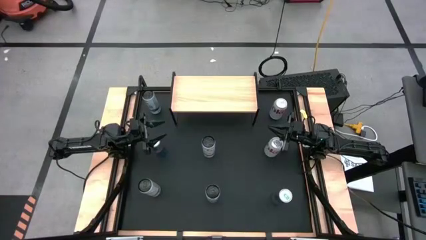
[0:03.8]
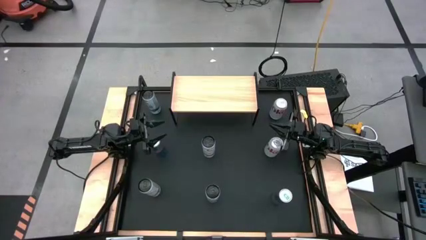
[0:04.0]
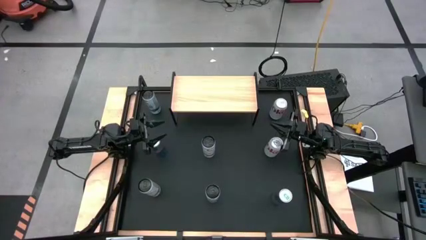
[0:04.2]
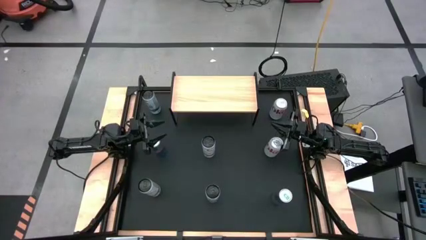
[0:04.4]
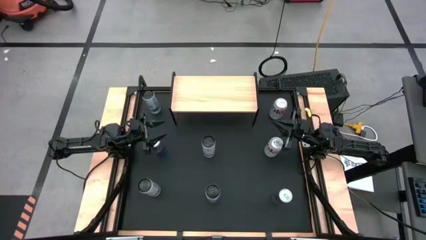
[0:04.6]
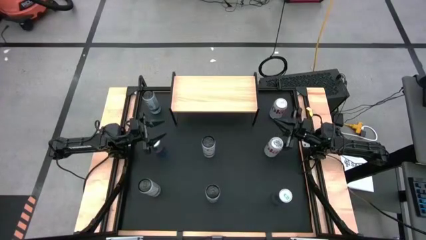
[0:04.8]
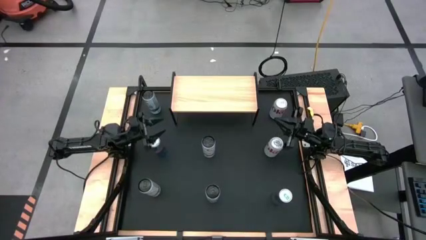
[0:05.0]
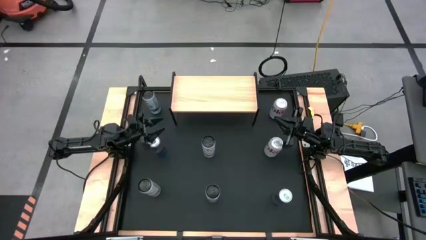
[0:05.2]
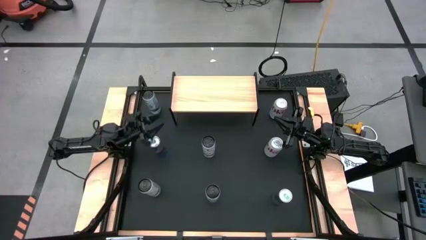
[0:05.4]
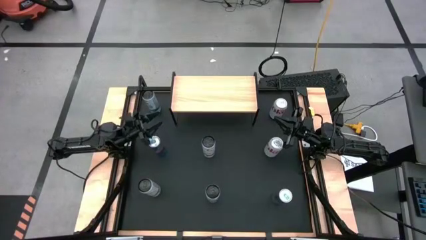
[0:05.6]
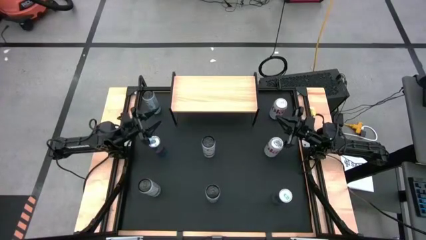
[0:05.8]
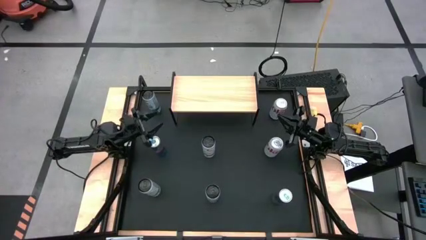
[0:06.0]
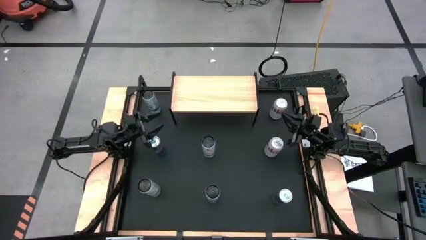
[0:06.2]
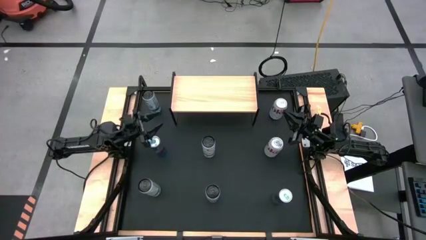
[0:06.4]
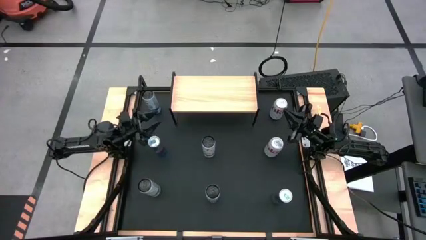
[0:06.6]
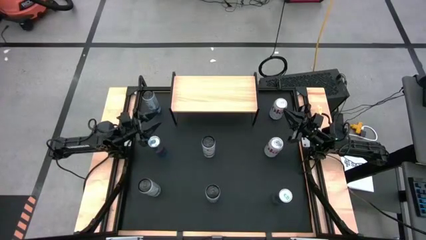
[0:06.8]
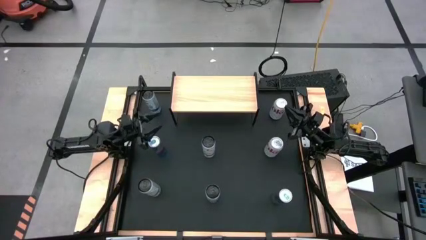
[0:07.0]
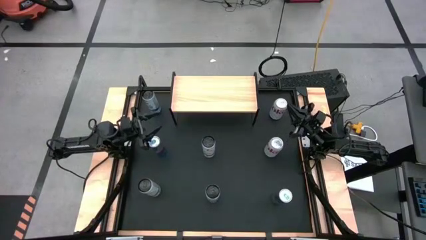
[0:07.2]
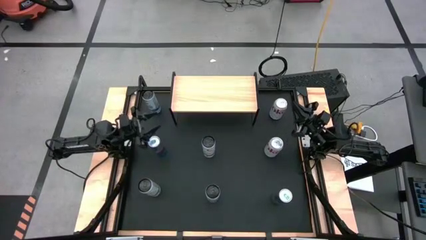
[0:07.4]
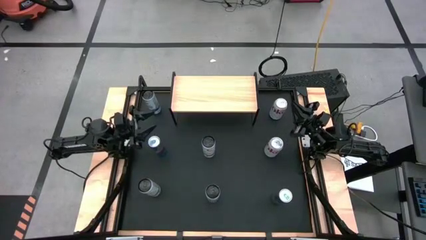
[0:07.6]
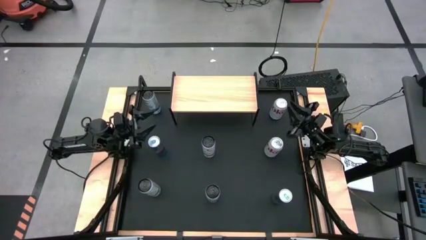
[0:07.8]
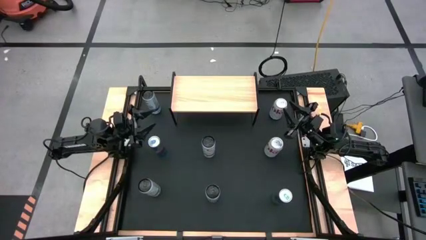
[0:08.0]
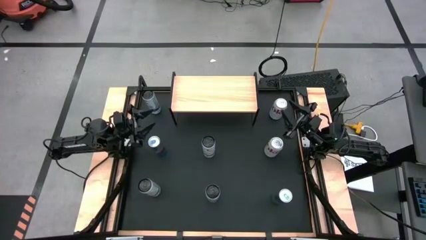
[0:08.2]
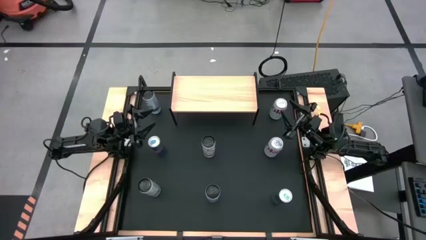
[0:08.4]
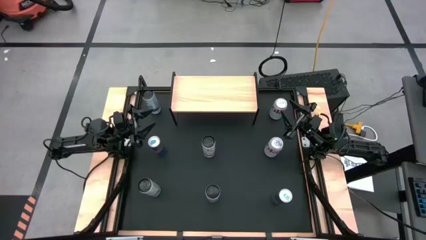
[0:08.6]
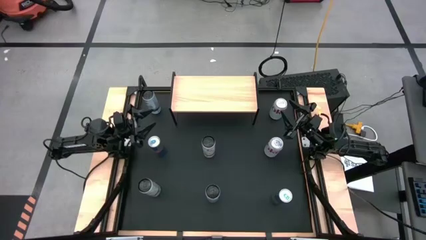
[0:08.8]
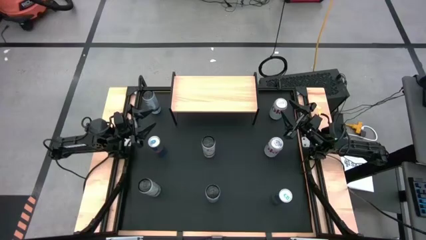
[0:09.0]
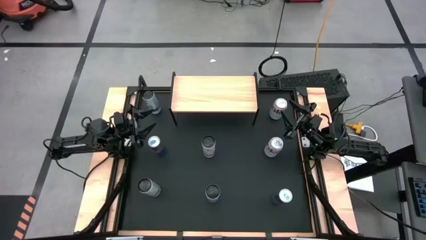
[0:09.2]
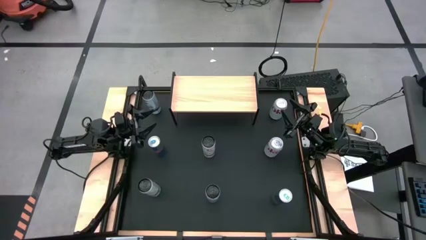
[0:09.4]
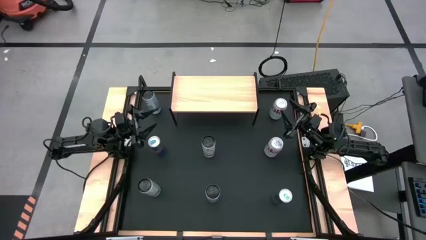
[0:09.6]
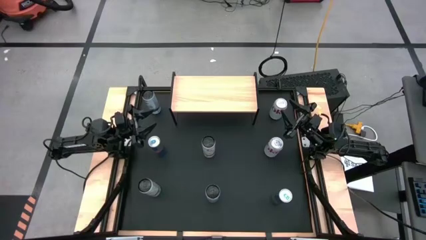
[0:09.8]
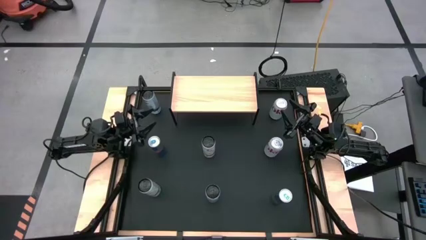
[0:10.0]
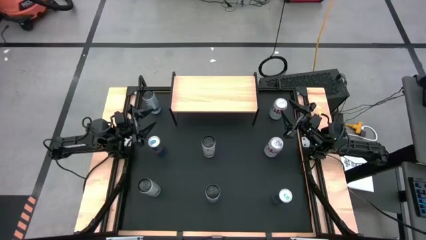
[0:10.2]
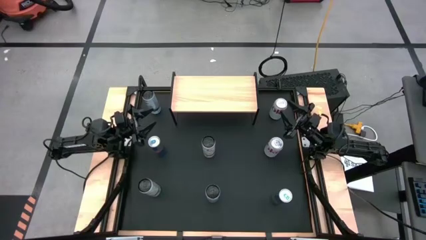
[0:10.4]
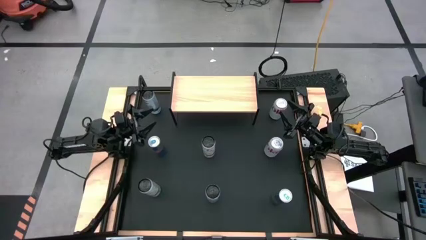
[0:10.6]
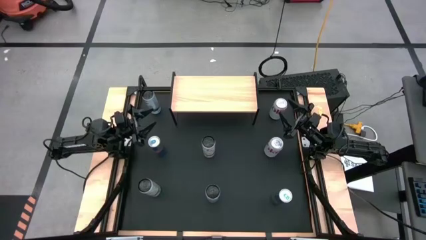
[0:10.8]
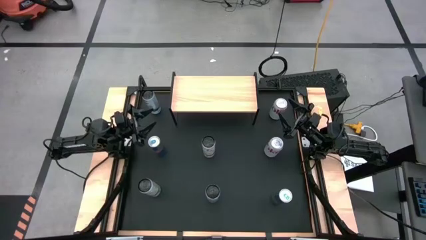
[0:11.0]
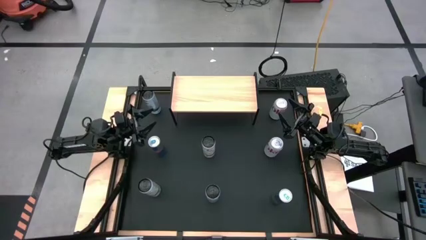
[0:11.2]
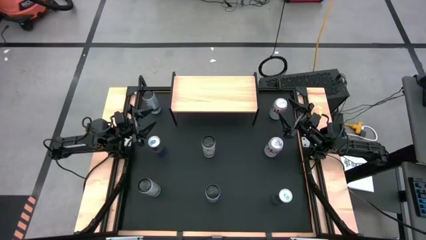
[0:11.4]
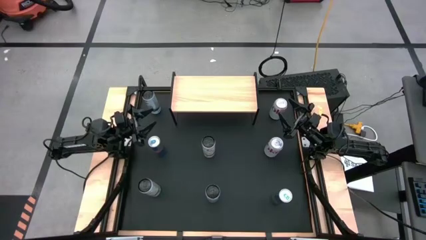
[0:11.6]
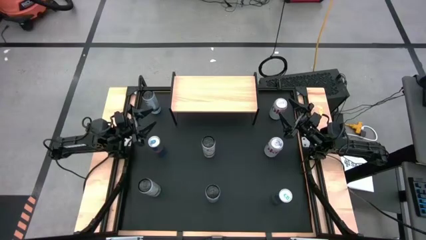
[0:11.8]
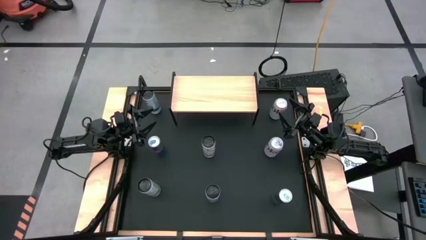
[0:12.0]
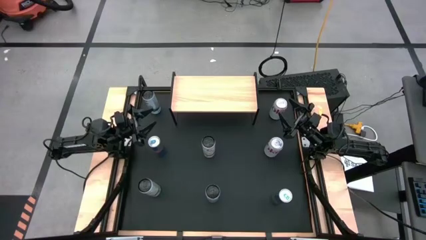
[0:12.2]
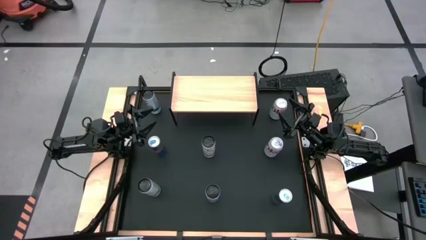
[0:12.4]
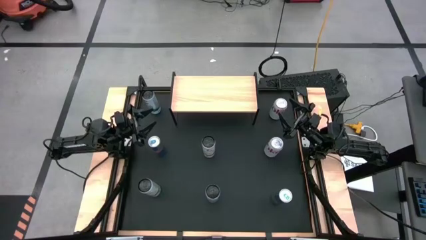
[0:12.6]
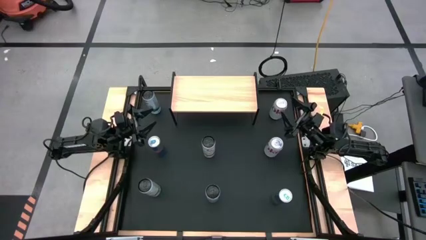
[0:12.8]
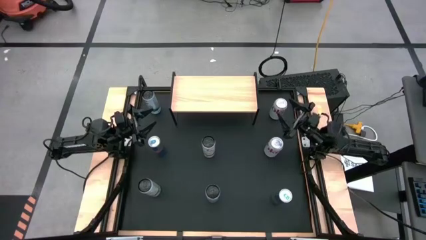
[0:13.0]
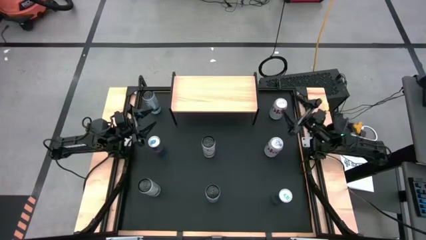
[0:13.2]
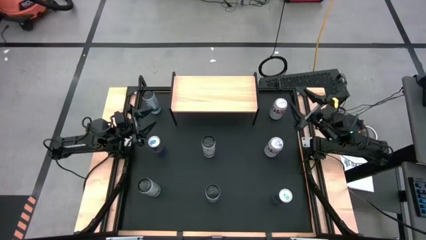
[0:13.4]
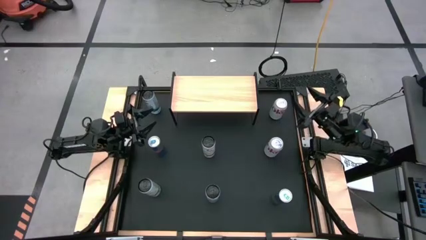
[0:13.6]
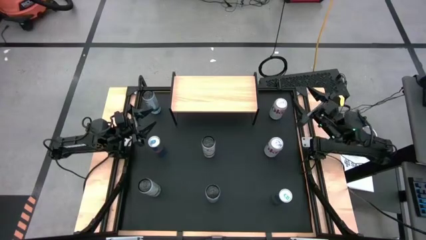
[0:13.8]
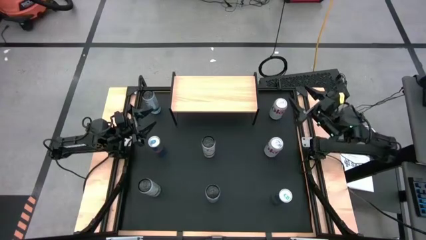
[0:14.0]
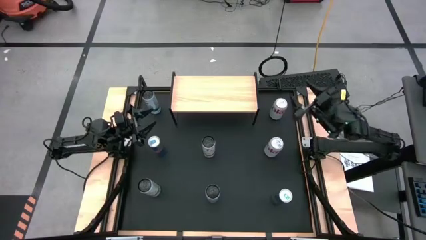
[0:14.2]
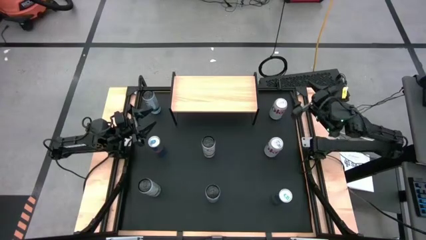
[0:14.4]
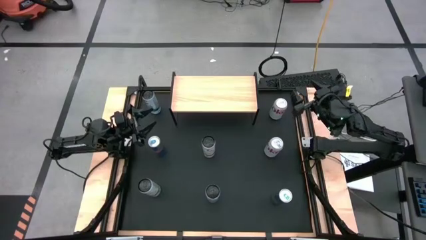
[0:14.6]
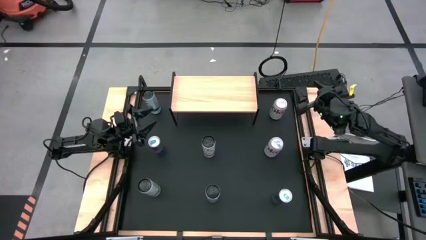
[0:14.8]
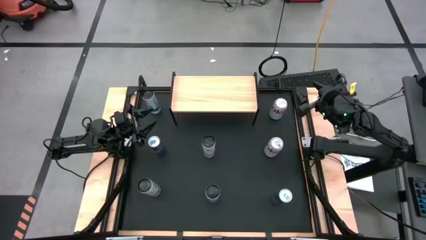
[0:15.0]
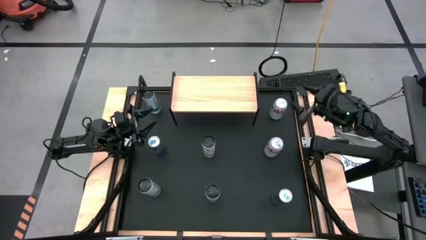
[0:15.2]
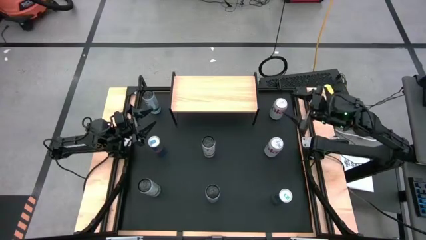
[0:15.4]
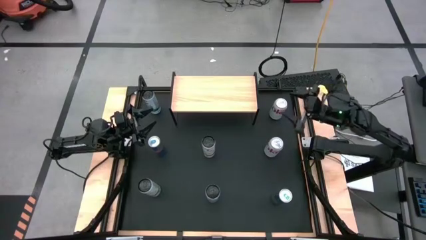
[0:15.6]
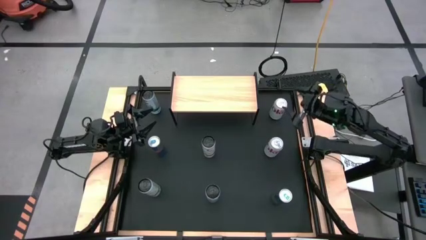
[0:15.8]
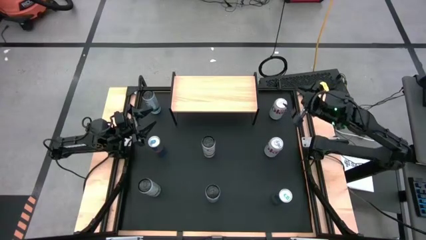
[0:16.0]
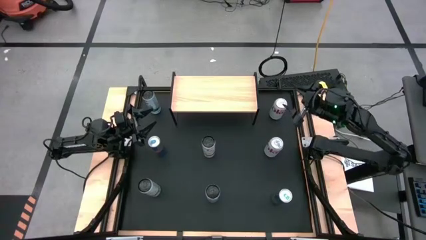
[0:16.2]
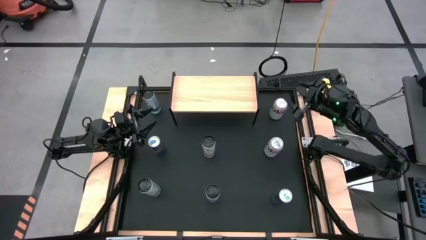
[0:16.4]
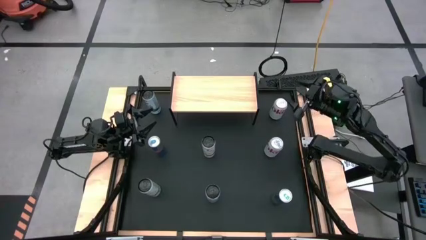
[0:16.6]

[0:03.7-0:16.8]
Task: Place canned beverage on shelf
Put the top white soda can on the shelf

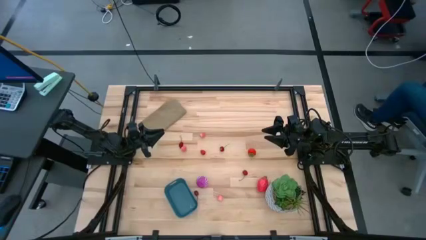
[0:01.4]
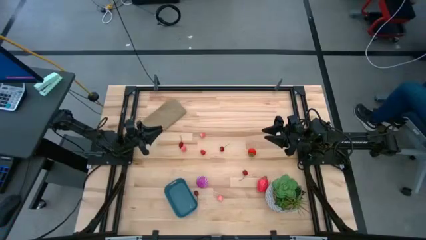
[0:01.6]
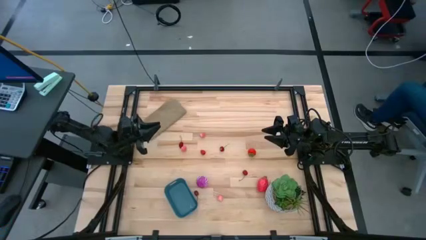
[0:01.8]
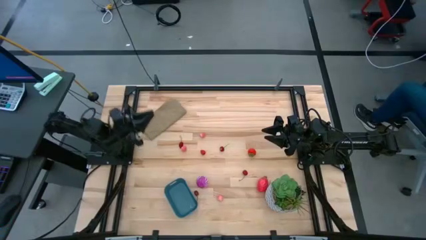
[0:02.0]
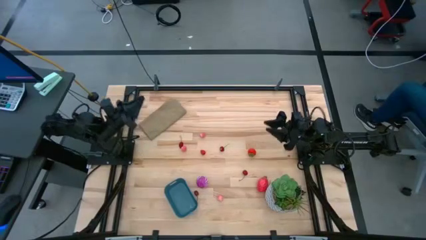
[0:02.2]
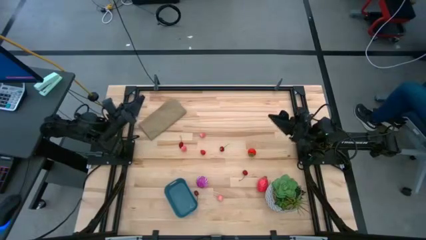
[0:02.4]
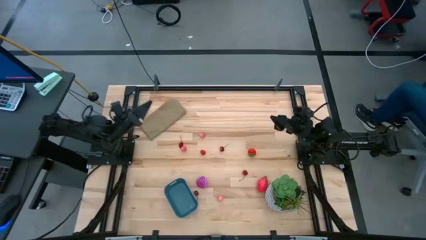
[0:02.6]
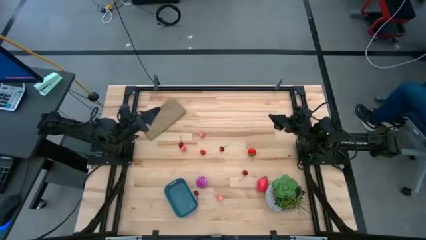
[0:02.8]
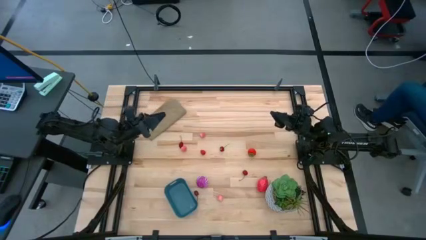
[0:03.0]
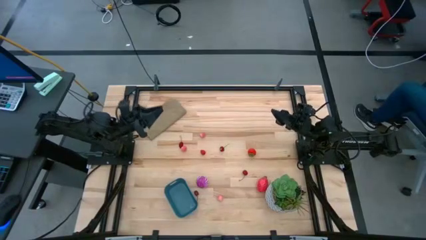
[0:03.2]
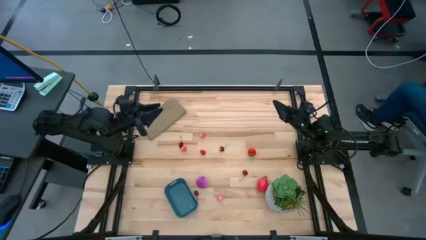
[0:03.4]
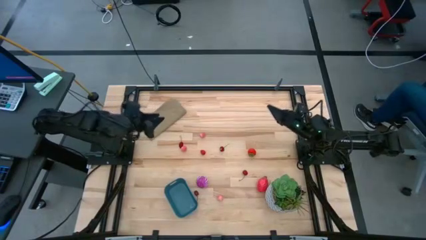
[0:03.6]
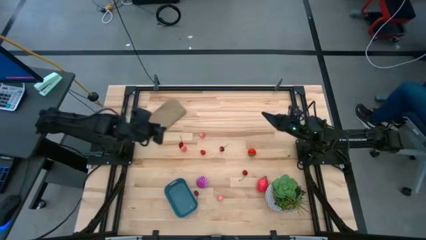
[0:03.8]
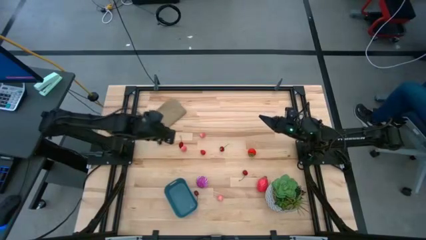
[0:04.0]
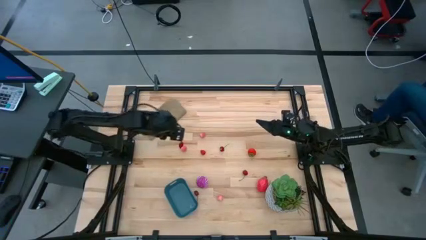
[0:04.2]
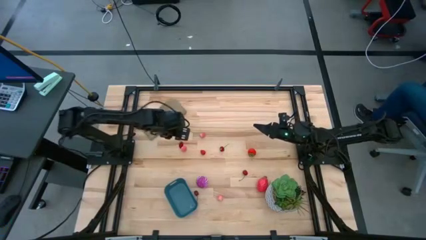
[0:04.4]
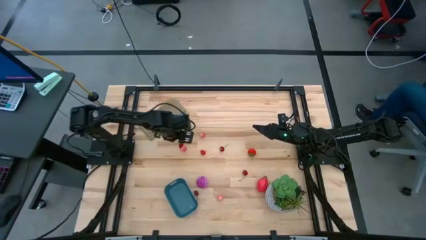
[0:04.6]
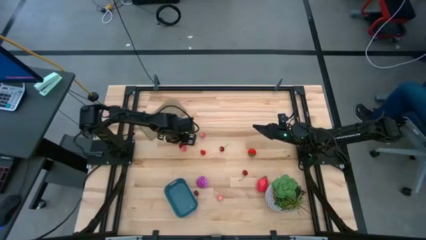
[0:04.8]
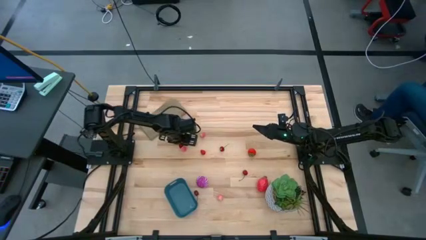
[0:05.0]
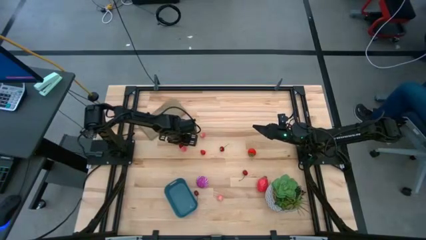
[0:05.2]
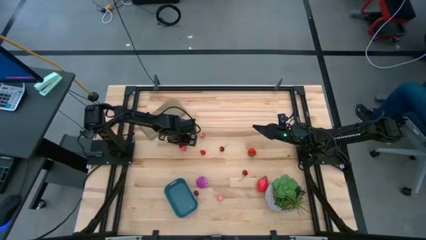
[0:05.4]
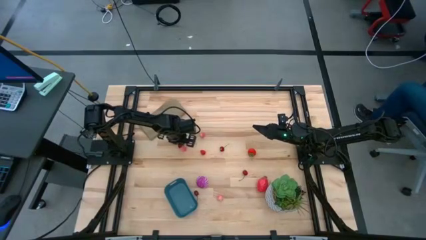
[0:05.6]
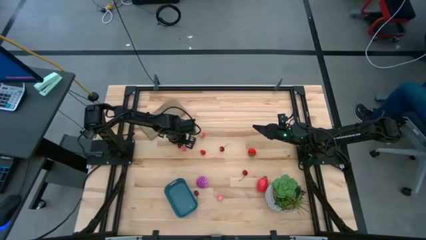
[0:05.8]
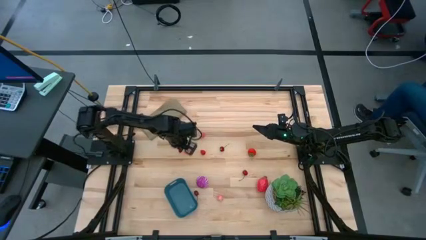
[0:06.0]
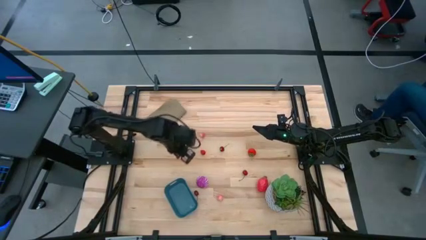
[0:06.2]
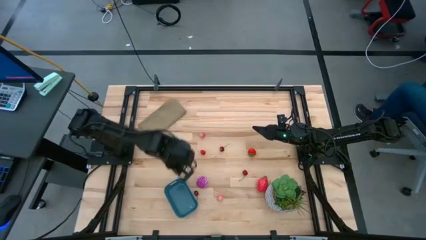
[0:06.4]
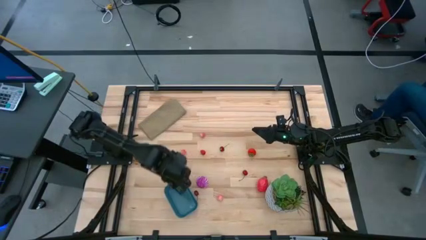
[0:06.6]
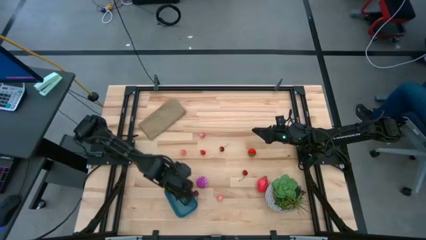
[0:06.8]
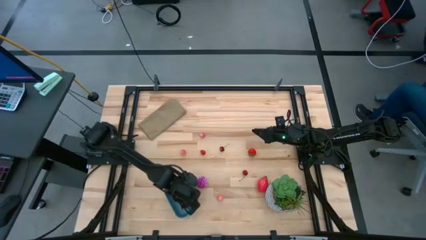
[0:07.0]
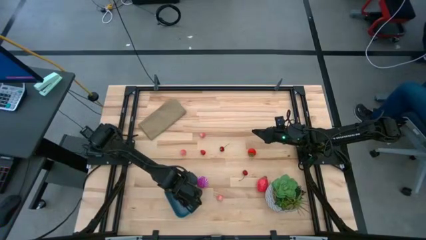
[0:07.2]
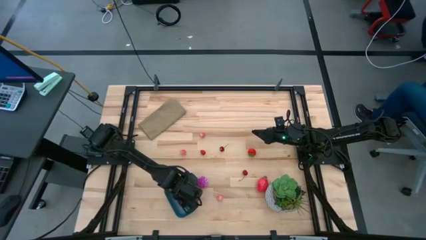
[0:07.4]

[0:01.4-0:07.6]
Task: Pick and placing Produce into tupperware
Put the red cherry into the blue bin
